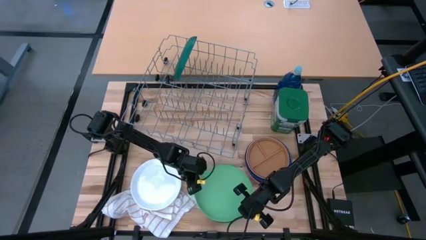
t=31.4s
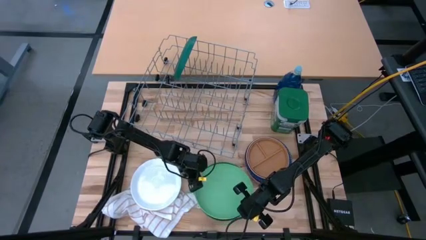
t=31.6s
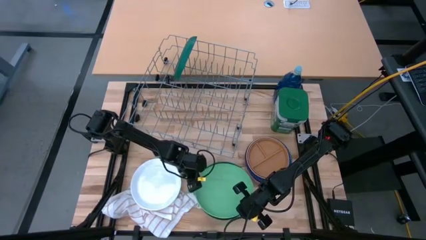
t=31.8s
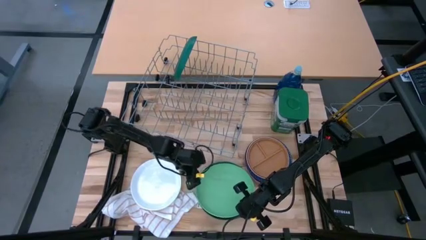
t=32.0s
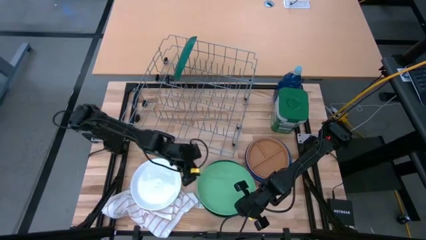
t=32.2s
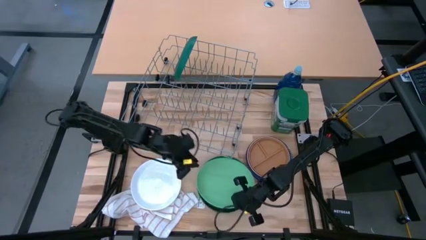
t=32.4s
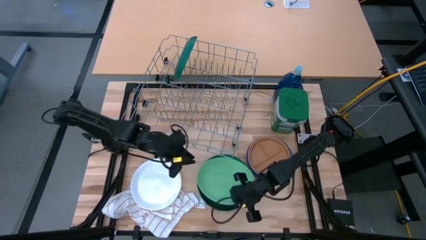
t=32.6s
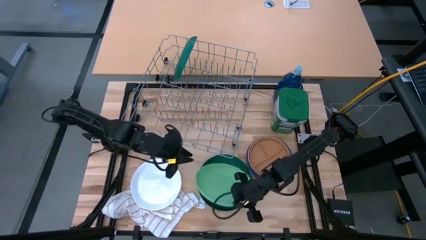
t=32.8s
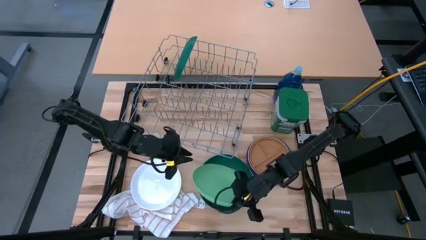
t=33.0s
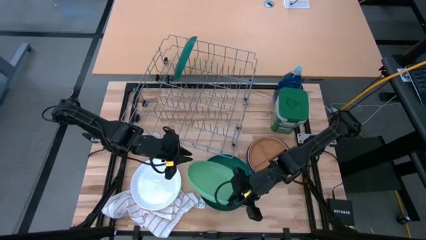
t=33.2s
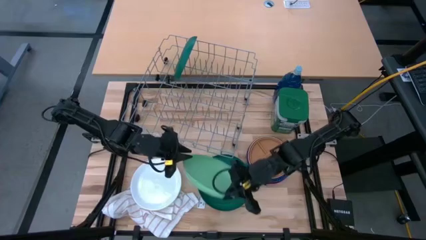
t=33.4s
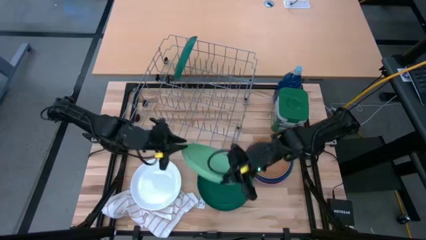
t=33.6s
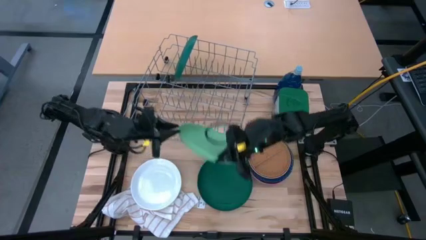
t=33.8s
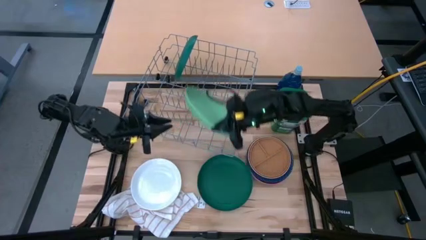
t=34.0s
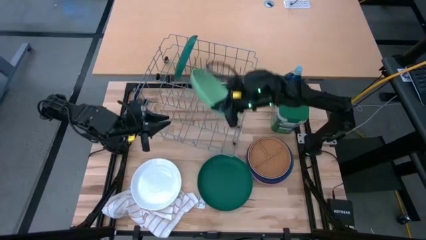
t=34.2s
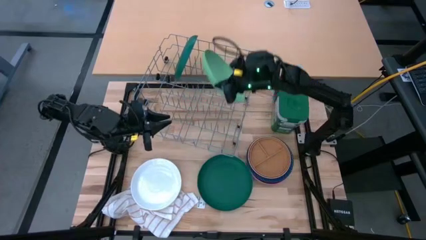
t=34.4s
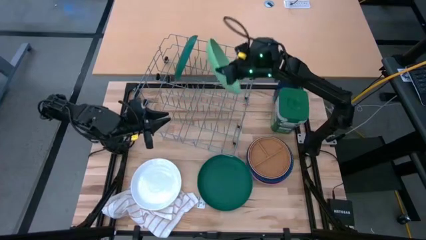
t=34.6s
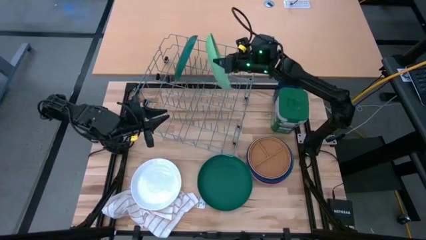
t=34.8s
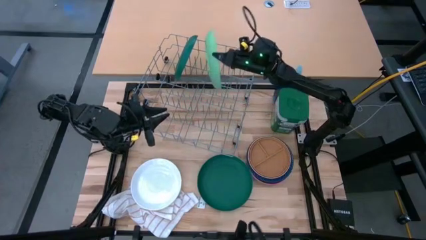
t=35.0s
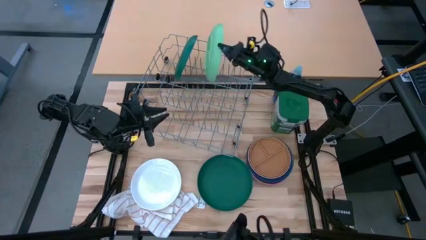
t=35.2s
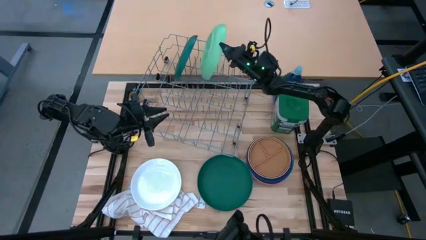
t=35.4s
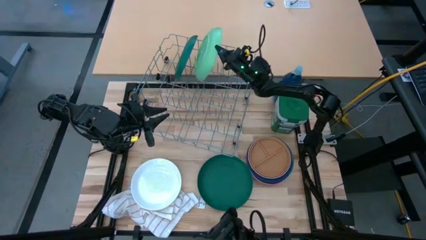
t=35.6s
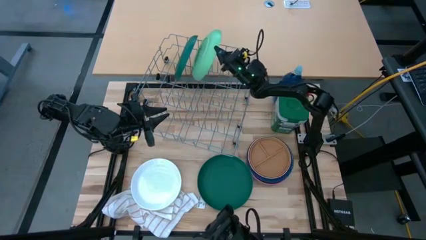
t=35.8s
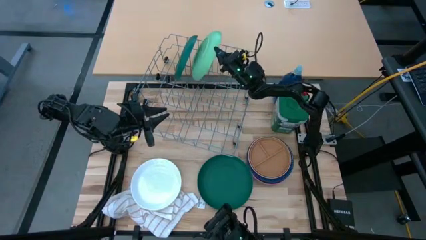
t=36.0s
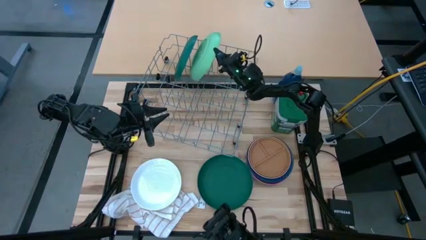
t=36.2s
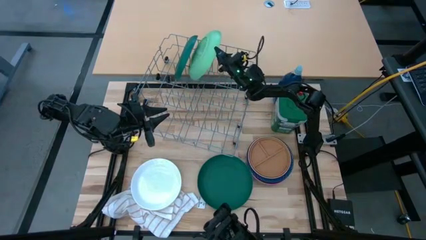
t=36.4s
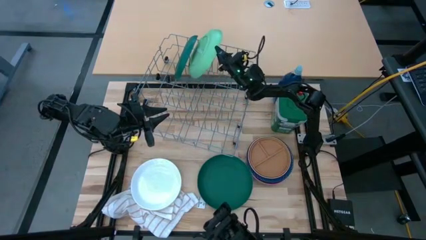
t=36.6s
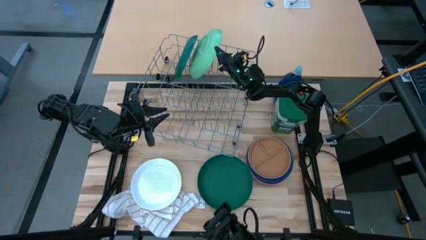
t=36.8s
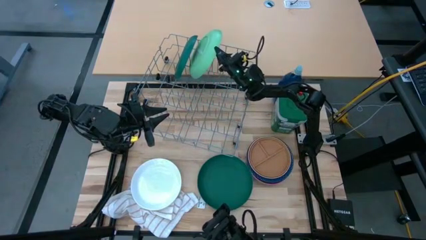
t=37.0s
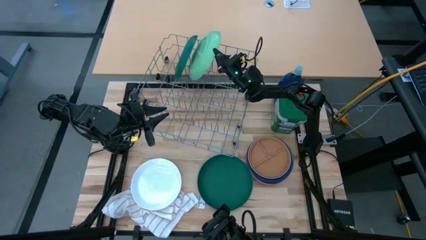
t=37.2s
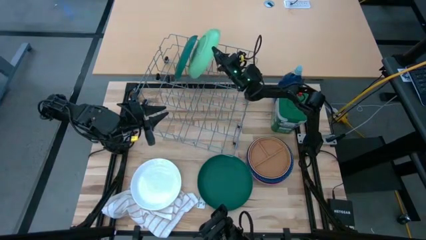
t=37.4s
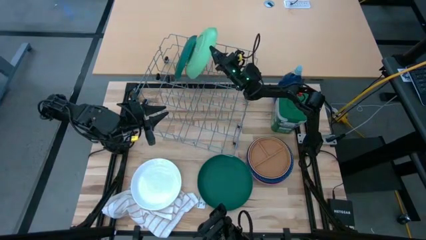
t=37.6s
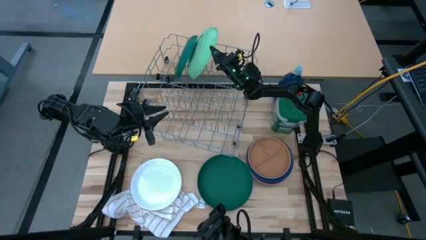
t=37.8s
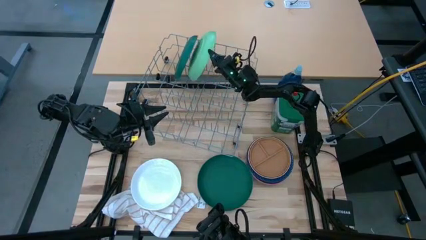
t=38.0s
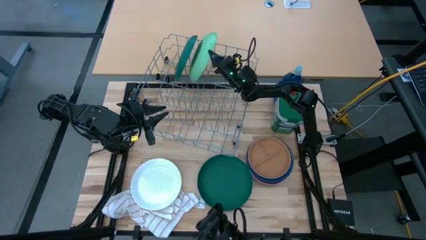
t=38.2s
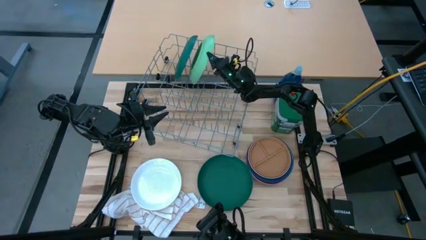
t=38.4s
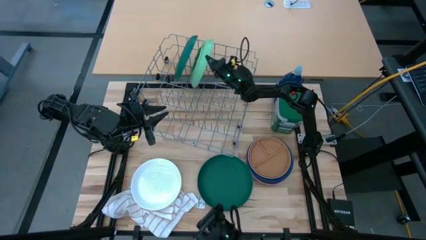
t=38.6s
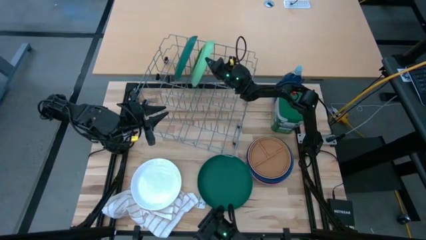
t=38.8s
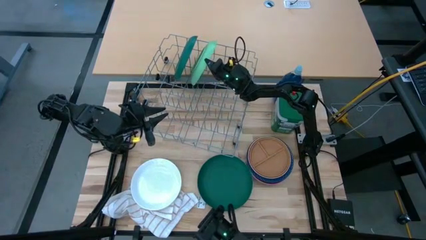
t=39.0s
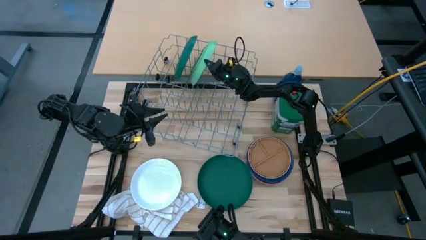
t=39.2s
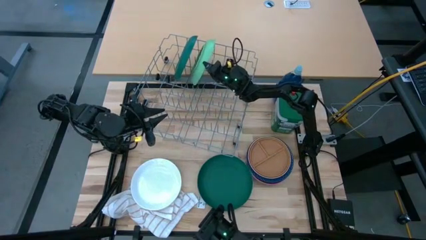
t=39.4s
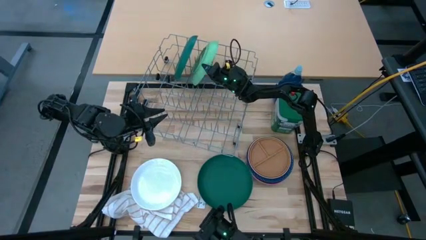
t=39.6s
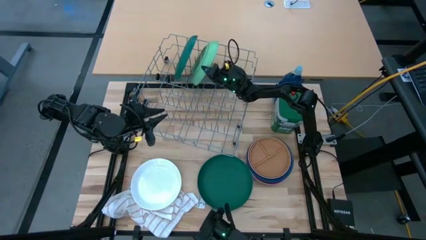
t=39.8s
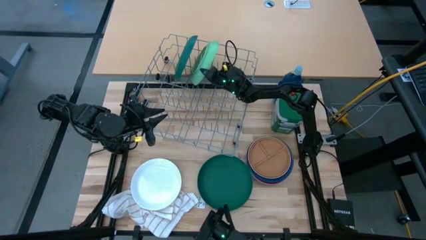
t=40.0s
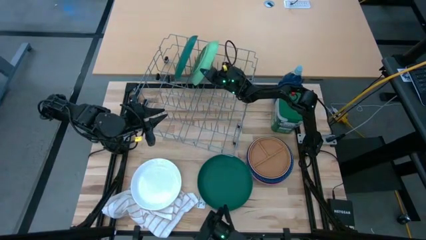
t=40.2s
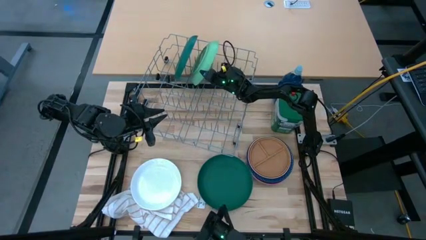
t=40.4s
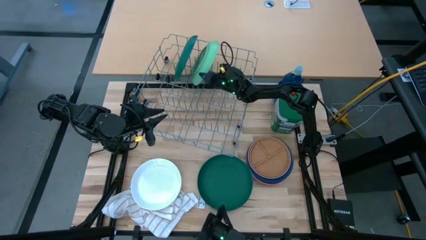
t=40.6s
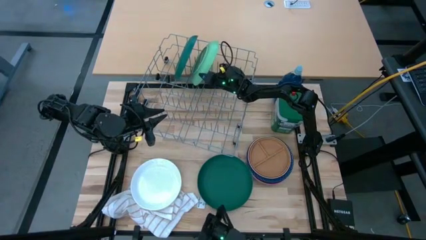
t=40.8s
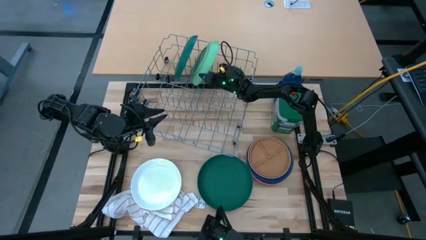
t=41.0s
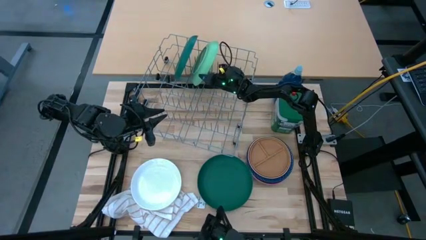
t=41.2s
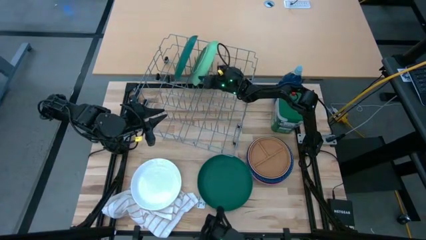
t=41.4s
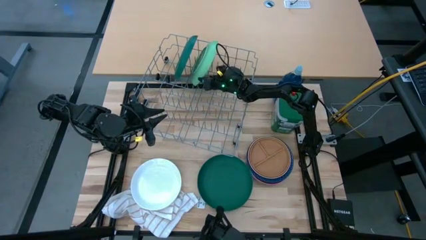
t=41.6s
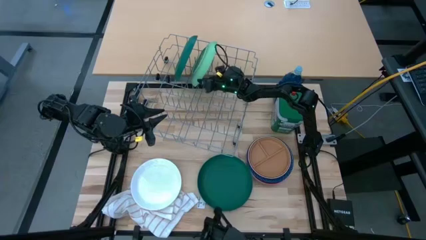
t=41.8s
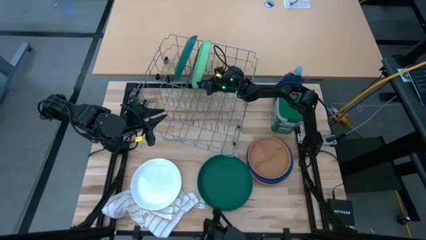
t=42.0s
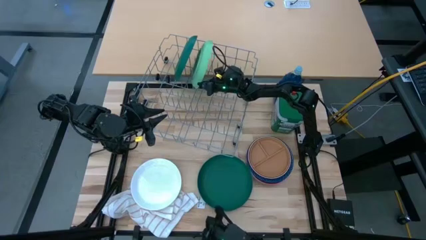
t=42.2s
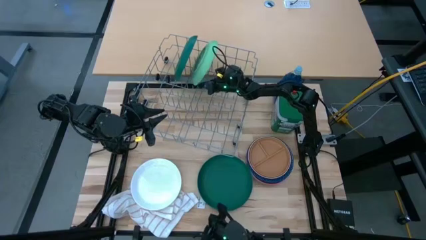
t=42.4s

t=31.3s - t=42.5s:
Task: Sort dishes
Put the green plate in the dish rack
